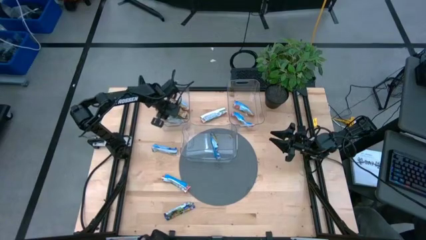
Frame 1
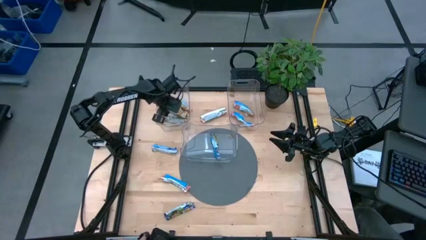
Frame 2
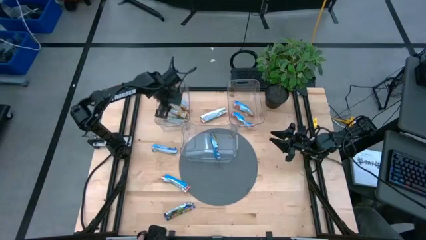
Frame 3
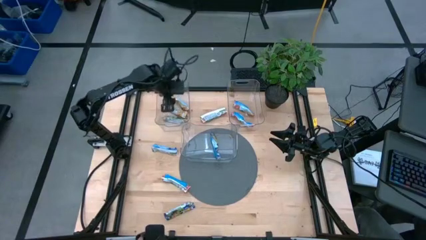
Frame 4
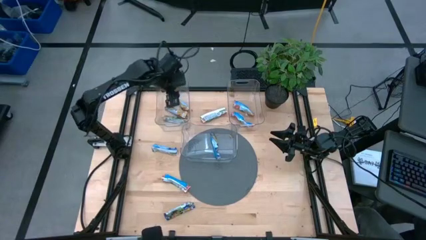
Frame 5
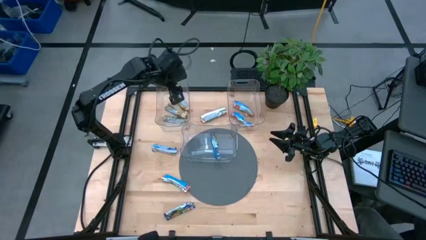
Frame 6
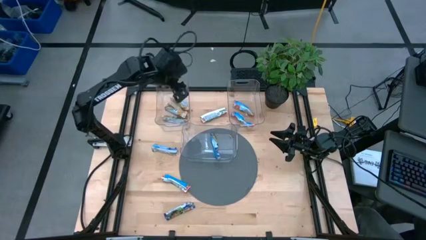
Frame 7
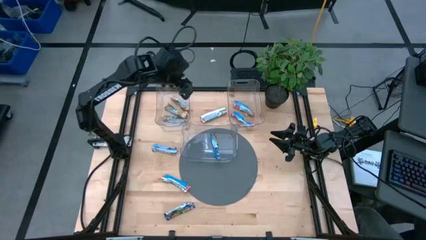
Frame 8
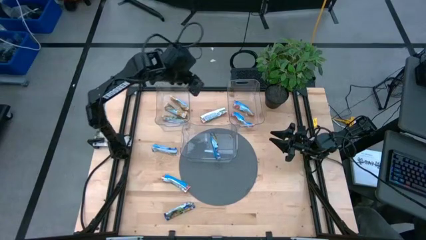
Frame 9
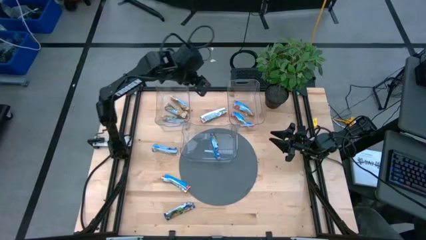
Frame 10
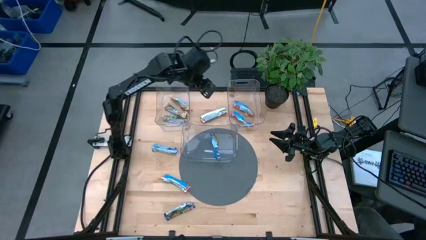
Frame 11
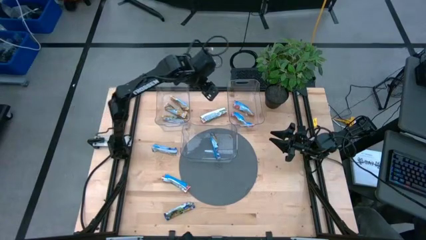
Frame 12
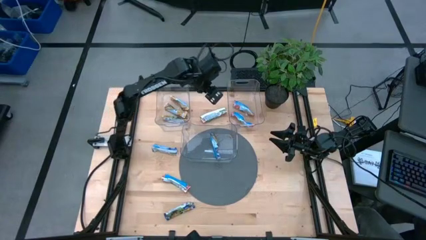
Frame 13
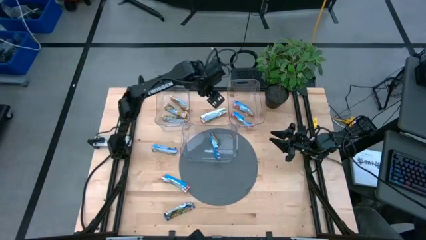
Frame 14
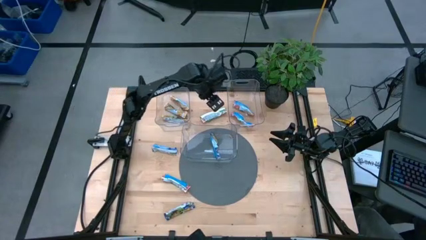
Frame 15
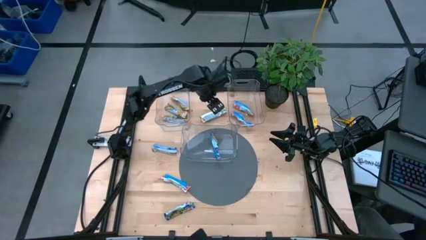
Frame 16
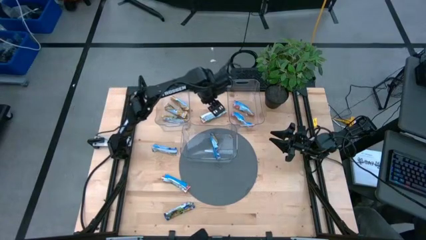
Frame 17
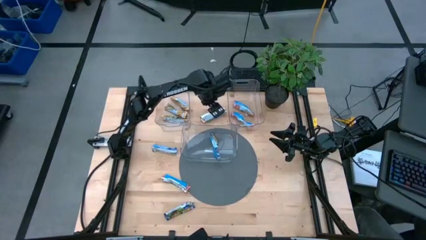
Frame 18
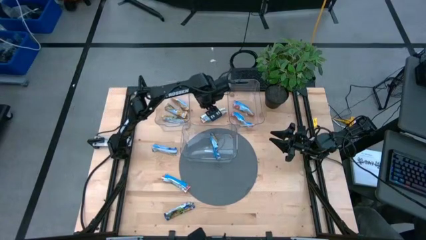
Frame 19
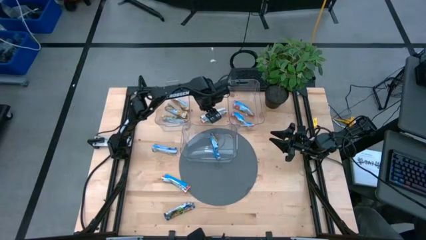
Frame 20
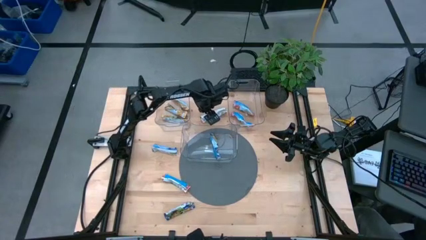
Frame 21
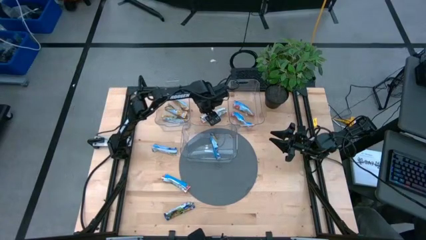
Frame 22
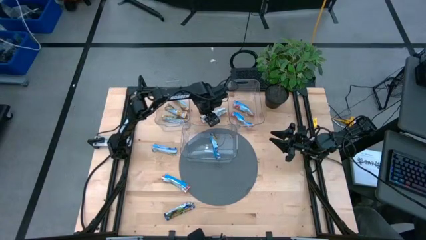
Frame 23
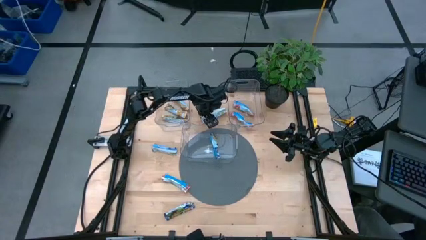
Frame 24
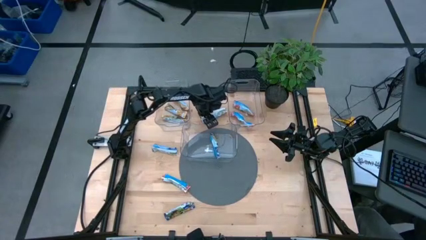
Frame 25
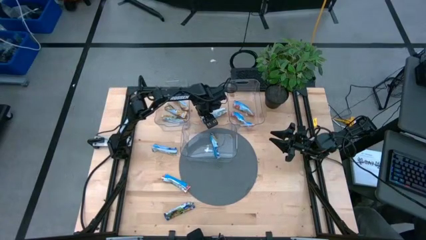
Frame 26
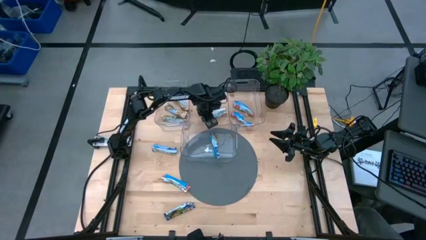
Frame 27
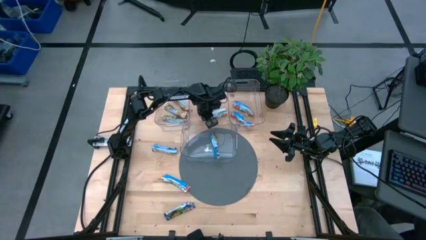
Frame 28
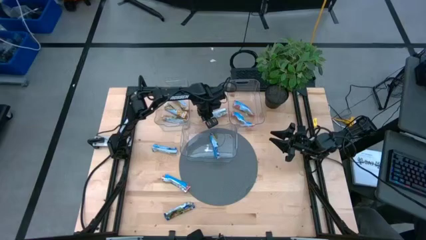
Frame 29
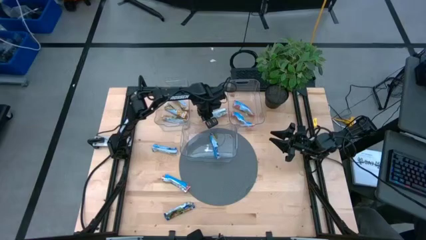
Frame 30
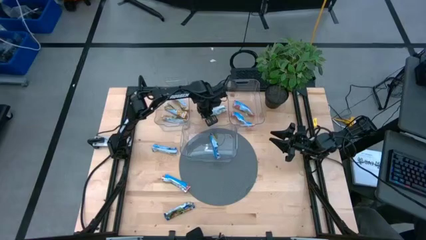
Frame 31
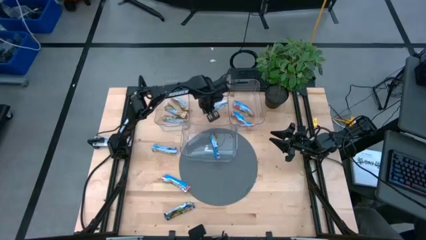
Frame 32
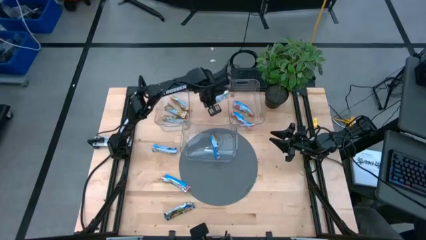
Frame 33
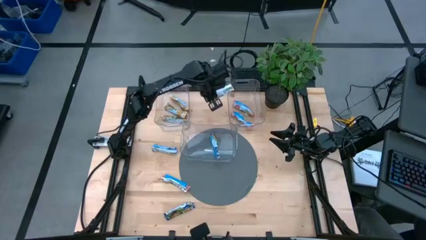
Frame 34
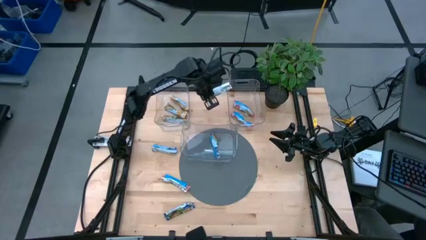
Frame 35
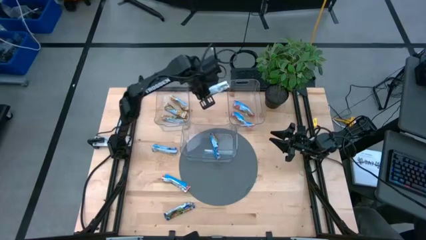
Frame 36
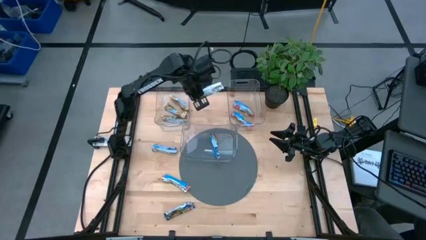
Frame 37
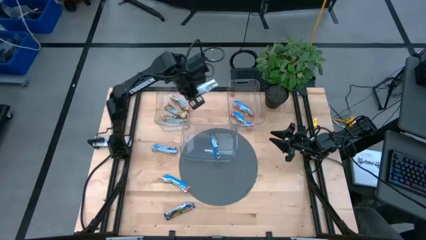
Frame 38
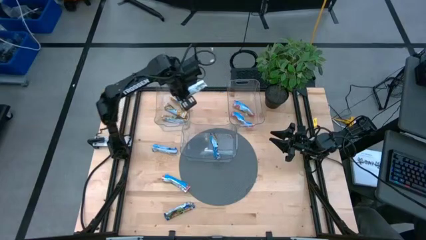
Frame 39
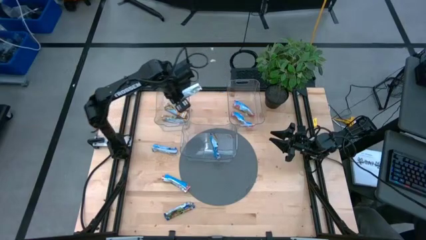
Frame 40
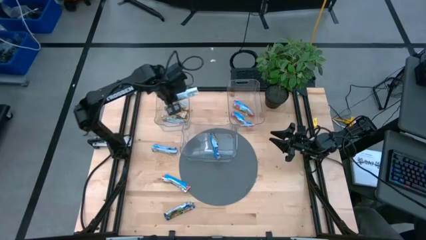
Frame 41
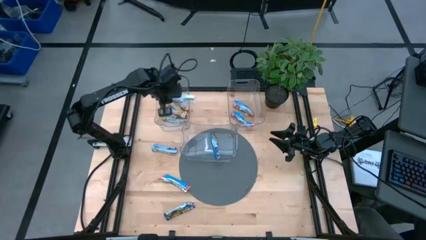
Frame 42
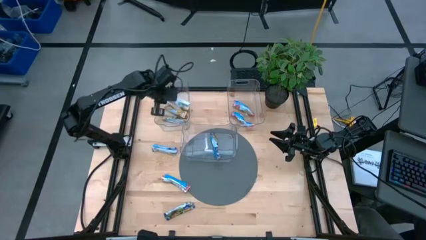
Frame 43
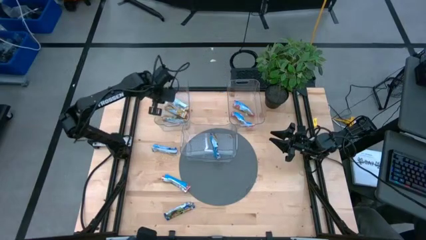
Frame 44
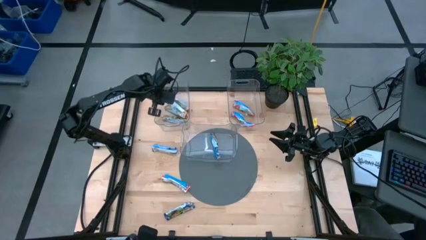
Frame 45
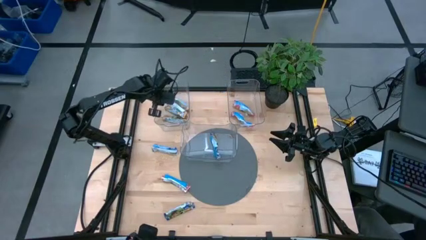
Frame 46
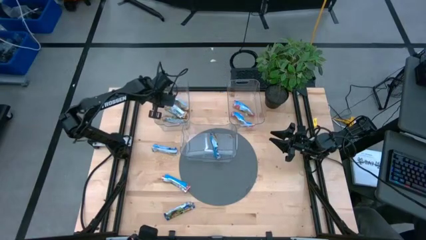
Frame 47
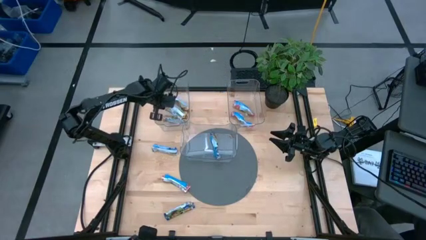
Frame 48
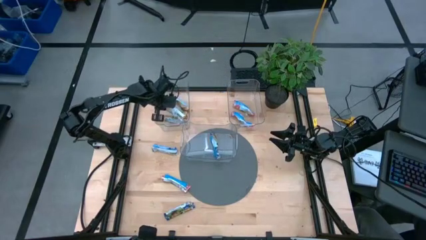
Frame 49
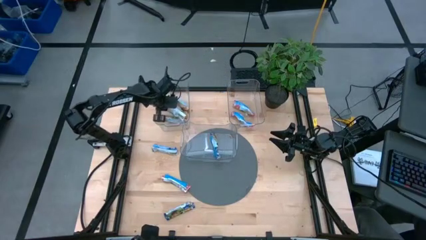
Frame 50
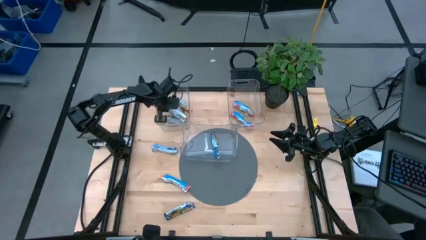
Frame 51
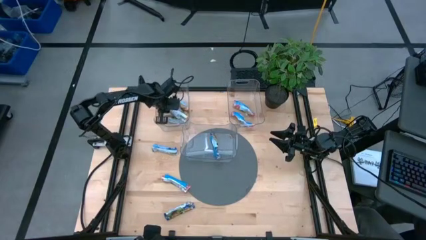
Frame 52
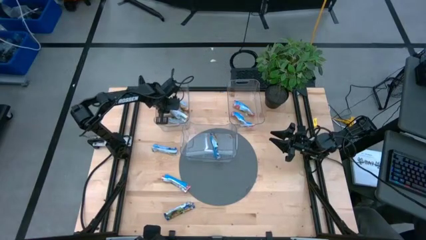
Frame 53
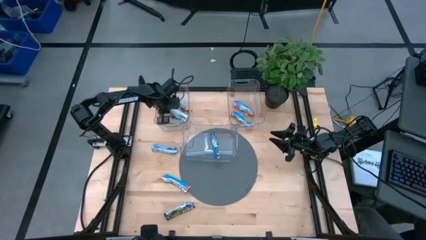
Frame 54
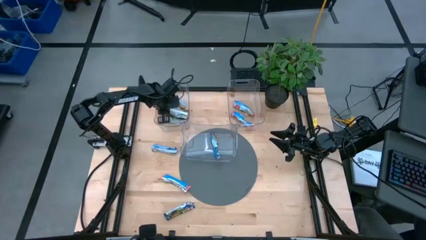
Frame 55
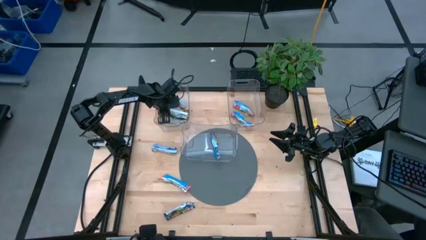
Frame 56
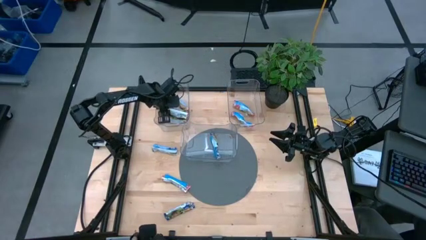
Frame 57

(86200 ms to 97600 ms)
Task: Pick and place Granola Bars by type
Put the yellow granola bar into the top left transparent bin

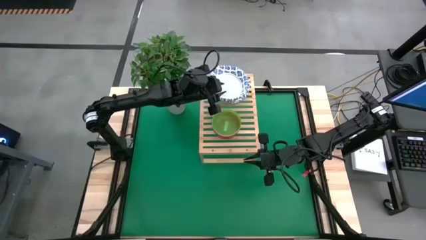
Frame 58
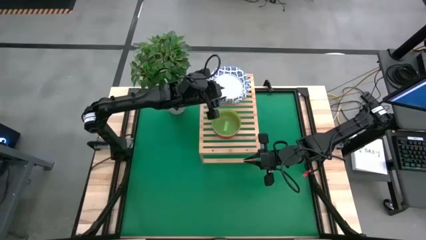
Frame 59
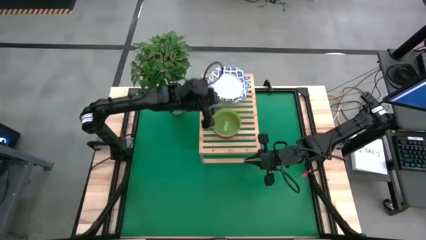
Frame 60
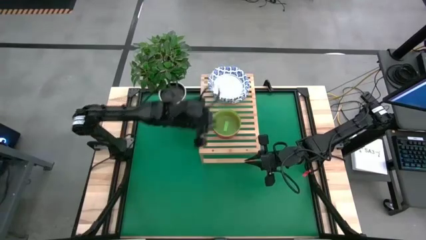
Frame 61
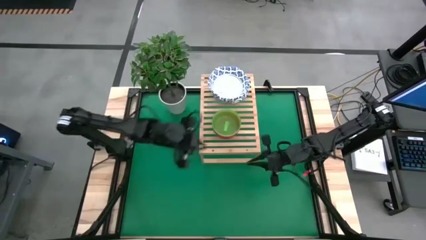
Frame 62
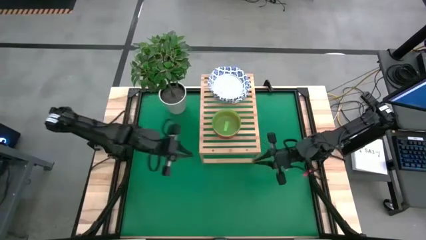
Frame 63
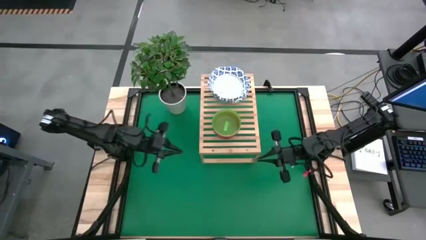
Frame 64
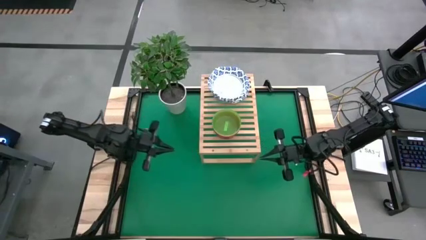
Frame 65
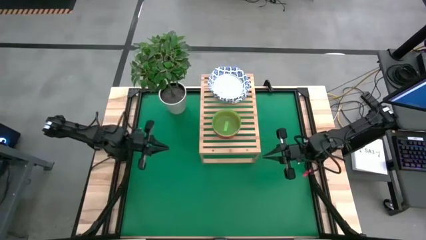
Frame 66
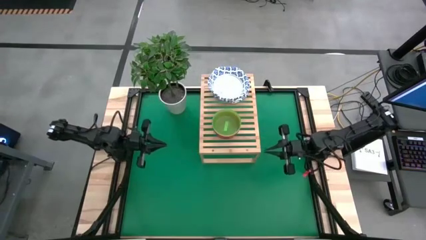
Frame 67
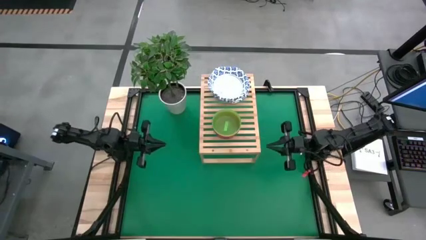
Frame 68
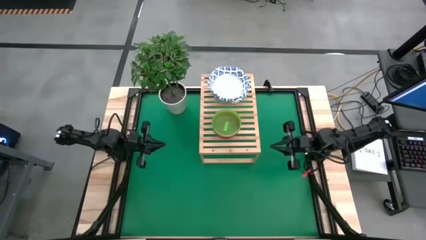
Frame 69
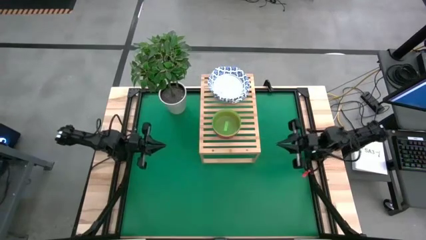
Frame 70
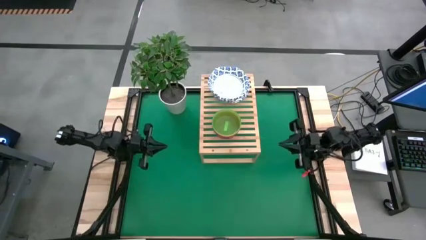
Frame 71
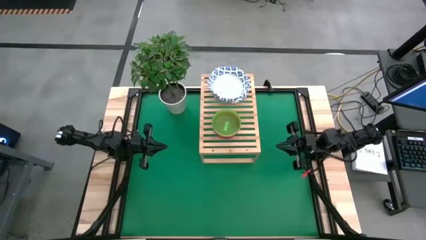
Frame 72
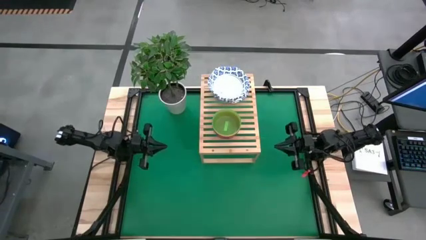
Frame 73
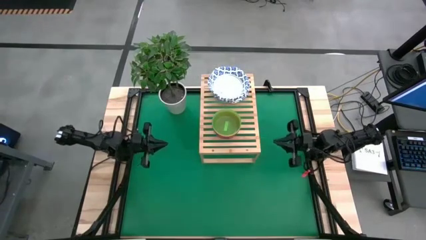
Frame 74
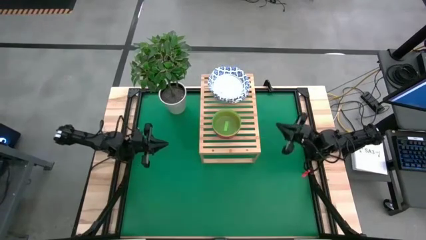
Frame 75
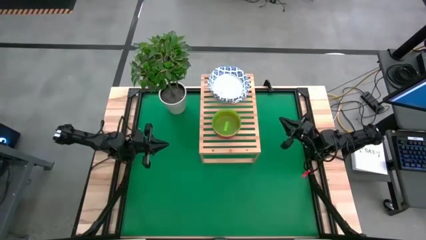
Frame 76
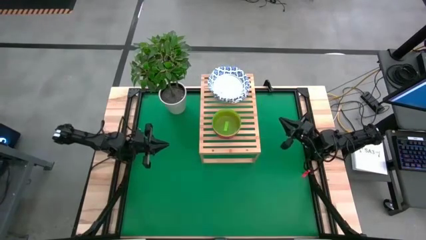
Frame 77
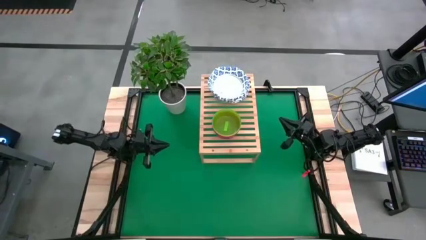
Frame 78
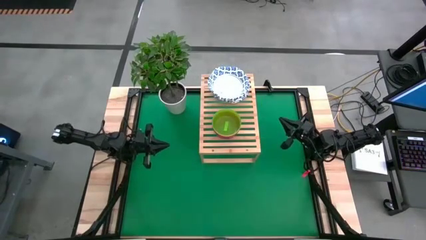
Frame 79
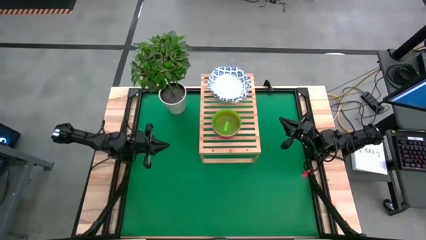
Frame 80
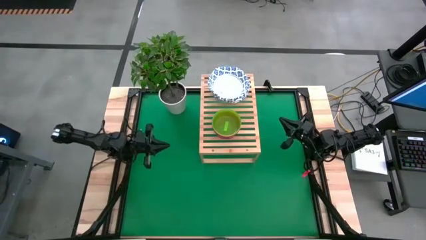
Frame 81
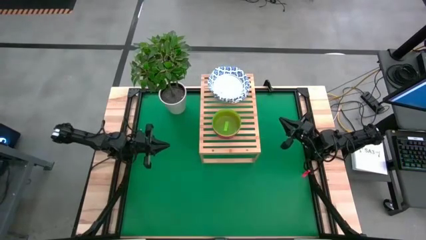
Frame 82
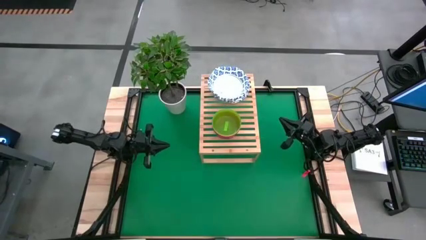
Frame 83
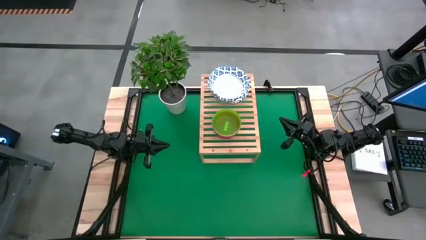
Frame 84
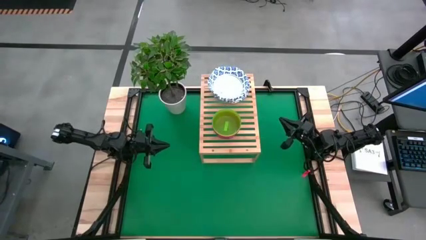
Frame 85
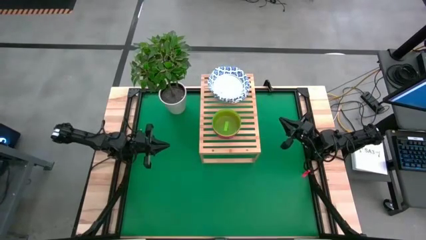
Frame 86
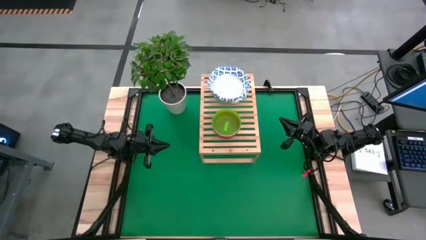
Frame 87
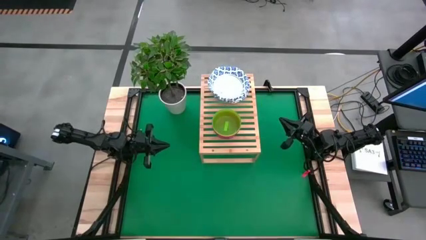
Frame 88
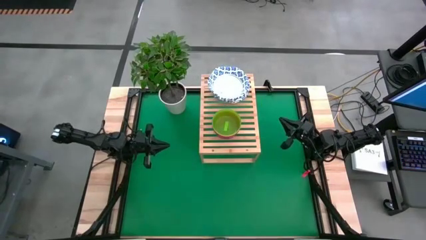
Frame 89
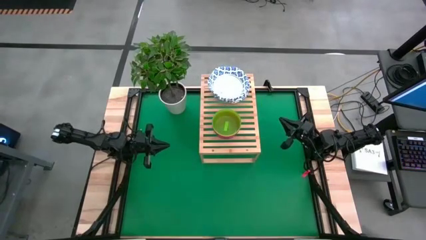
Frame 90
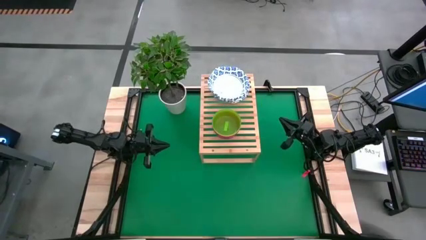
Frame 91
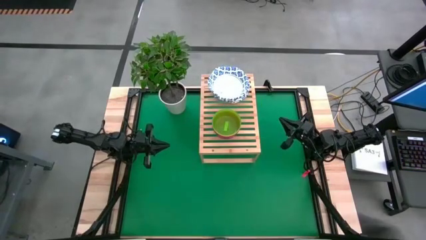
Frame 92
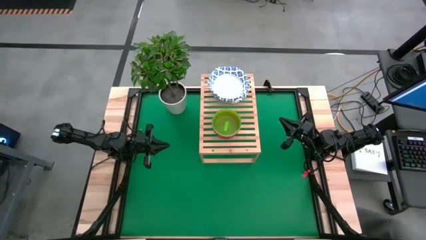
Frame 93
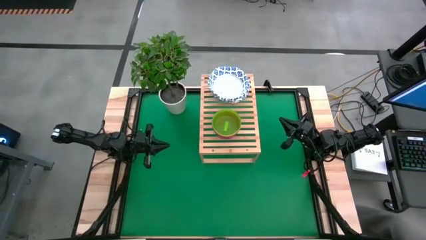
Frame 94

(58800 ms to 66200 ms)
Task: Place and stack bowls onto a shelf
Return to Home Position
